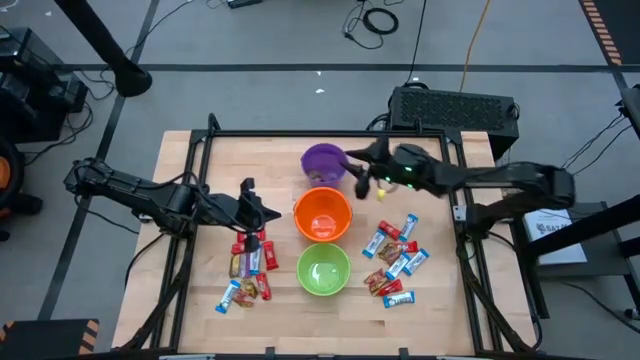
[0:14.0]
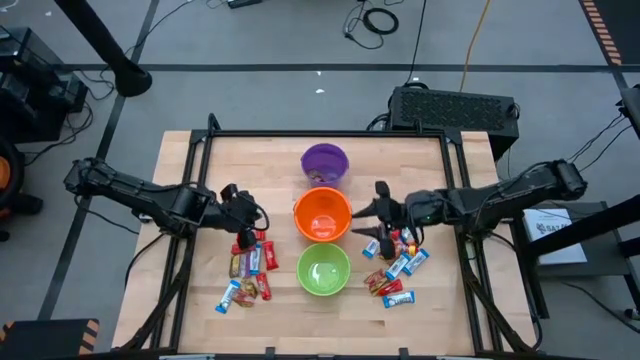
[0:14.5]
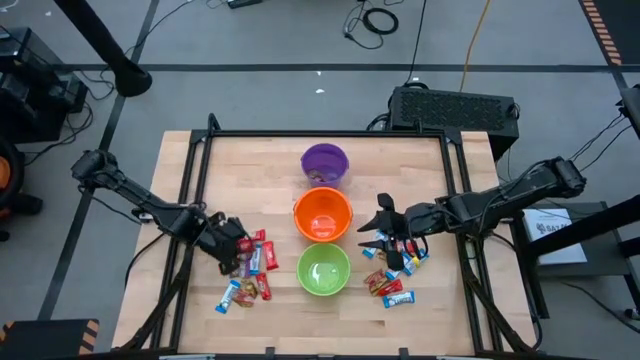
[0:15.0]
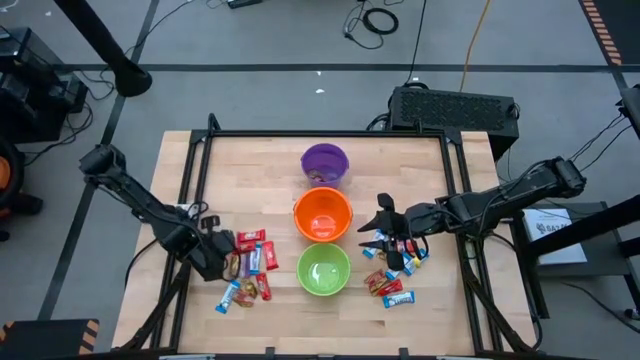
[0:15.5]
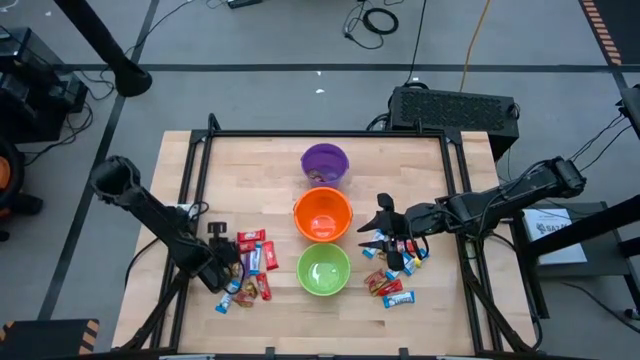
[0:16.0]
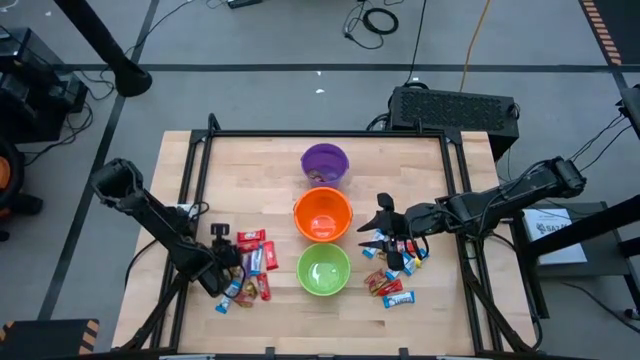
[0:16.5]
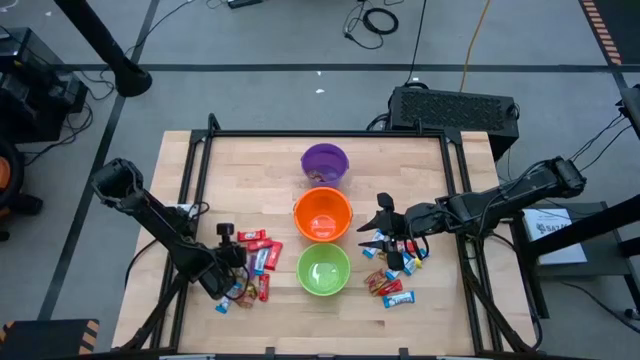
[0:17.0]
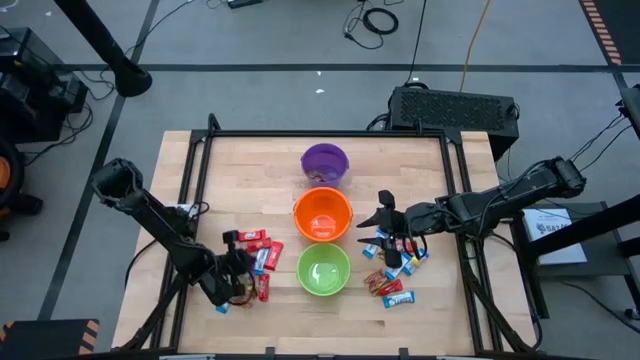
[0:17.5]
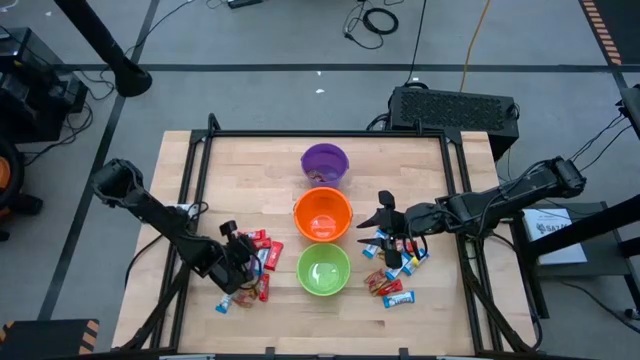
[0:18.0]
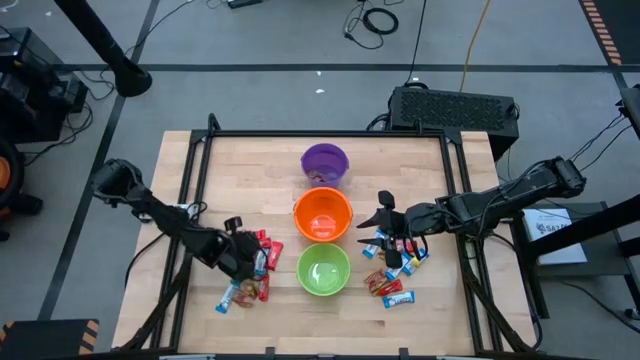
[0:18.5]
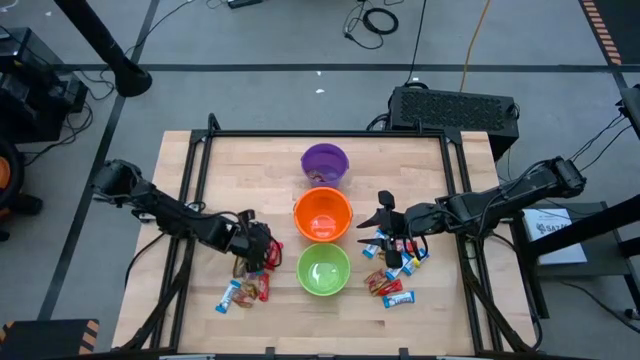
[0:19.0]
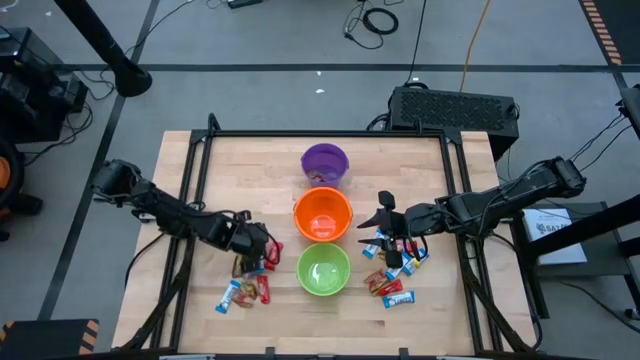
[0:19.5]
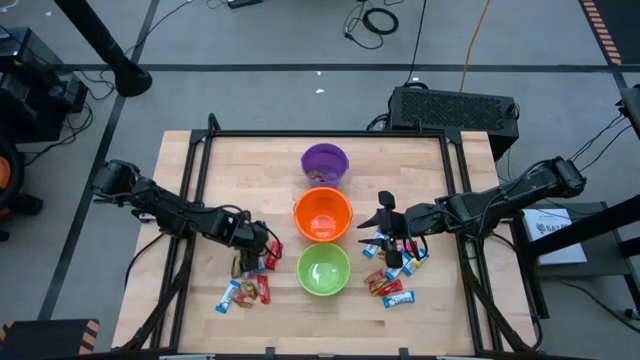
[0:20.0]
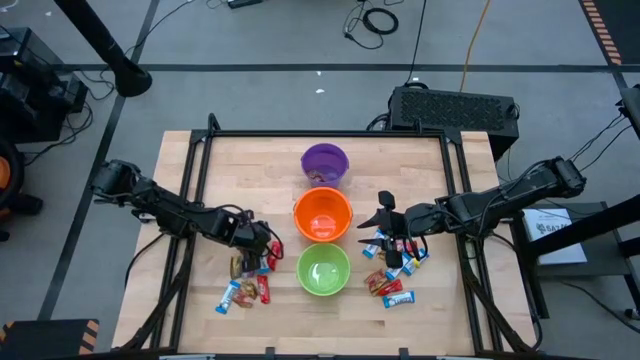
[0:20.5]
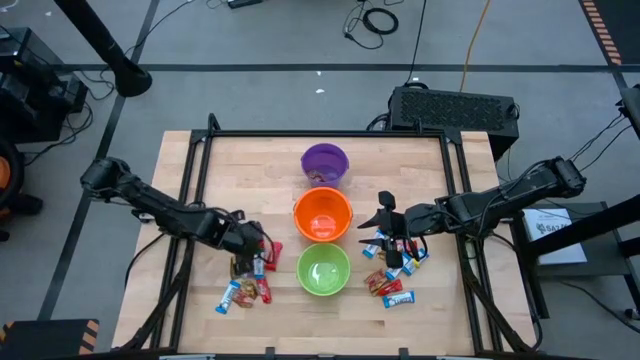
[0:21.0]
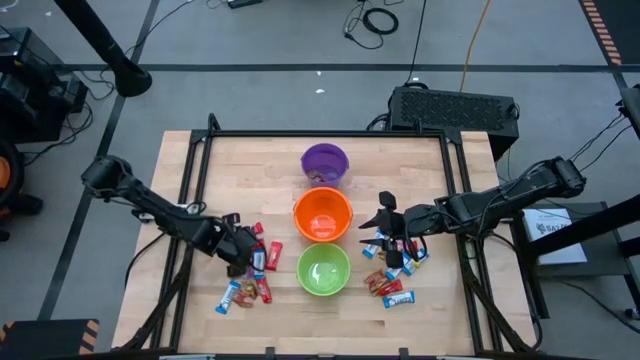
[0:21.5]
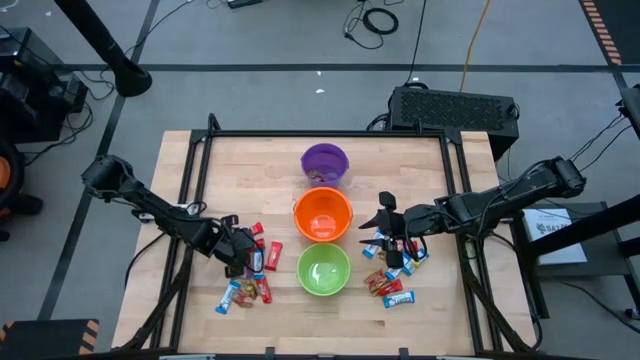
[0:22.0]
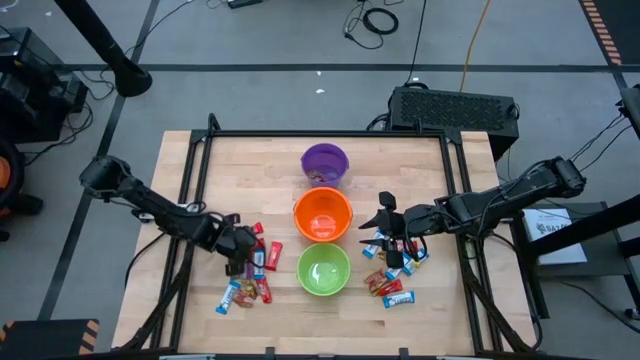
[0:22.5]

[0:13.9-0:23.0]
Task: Sort candy by brand, put in halloween buckets
Put red chocolate bar into the orange bucket

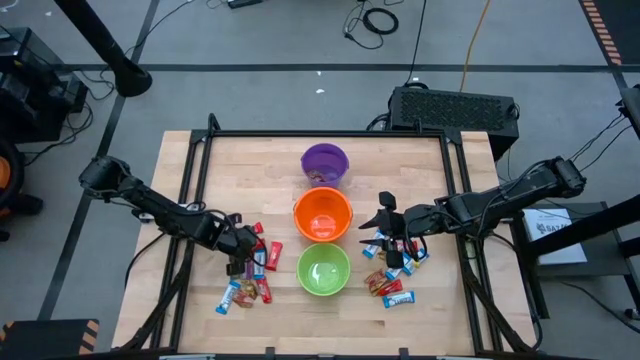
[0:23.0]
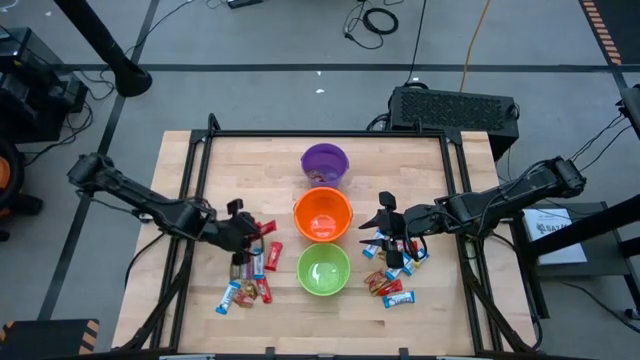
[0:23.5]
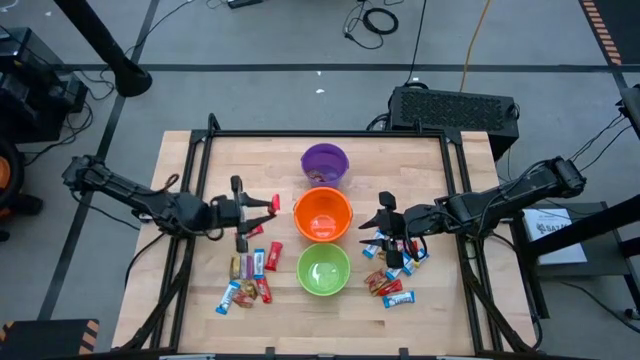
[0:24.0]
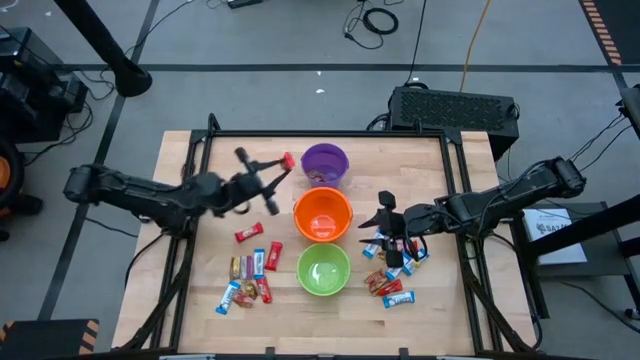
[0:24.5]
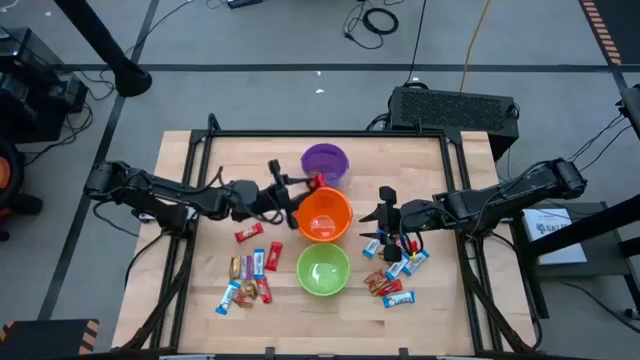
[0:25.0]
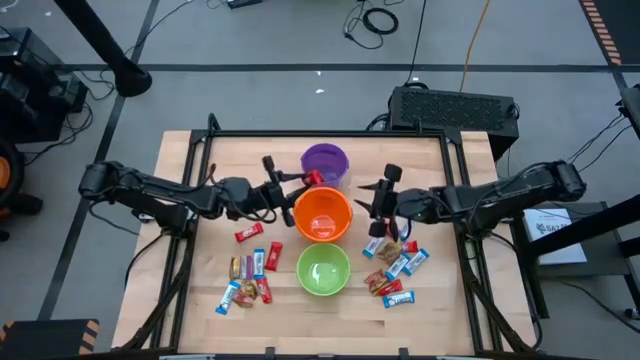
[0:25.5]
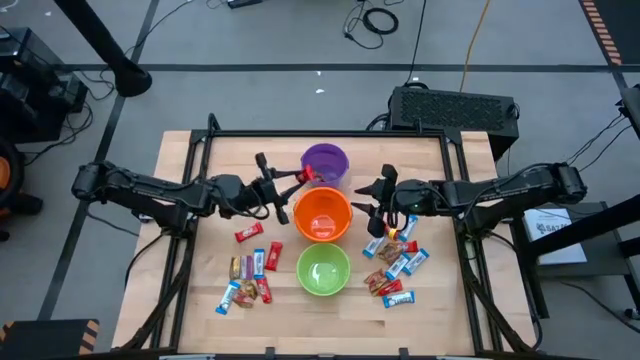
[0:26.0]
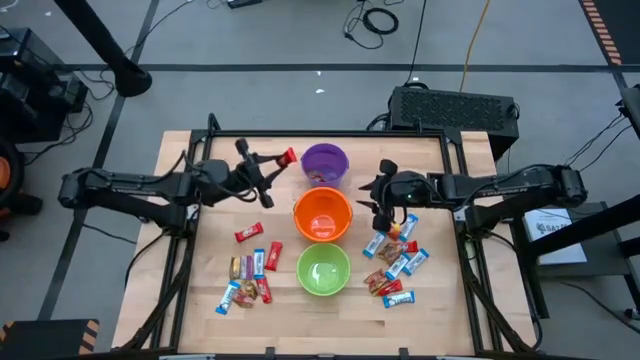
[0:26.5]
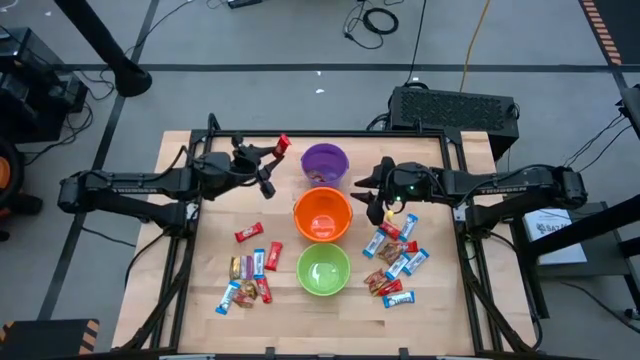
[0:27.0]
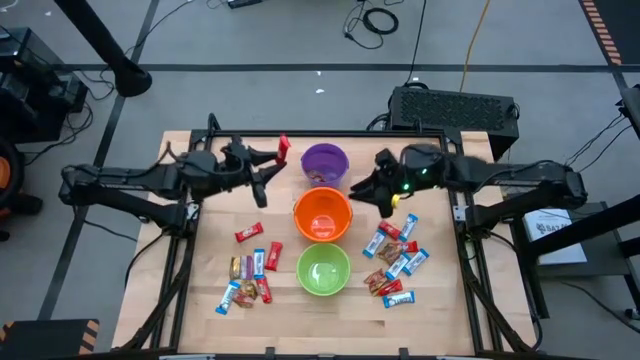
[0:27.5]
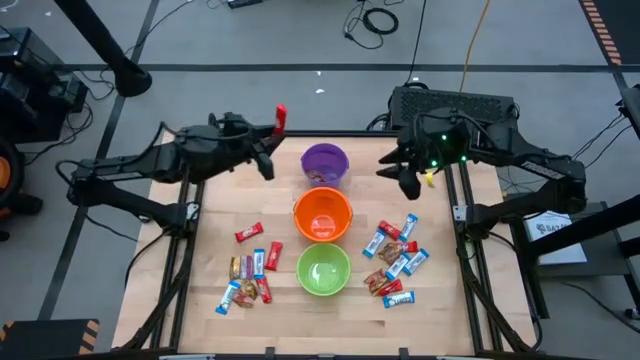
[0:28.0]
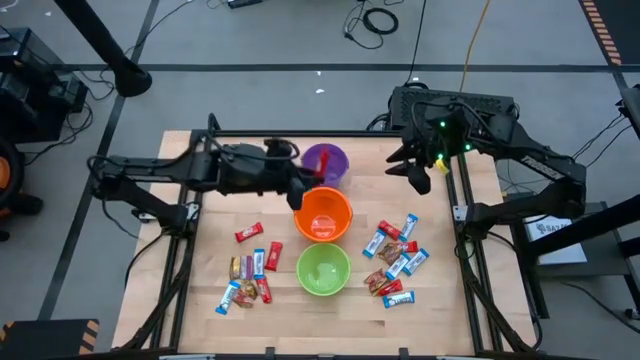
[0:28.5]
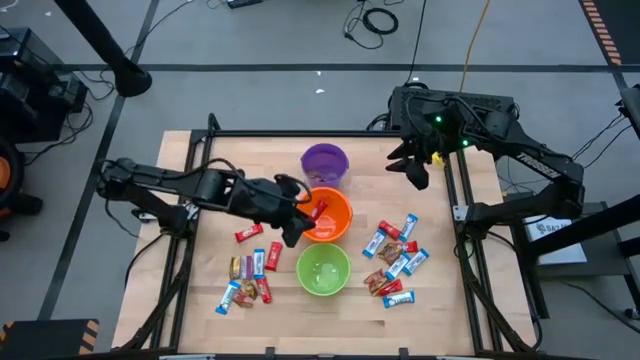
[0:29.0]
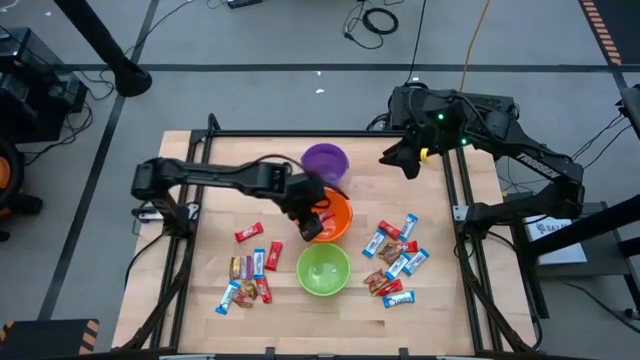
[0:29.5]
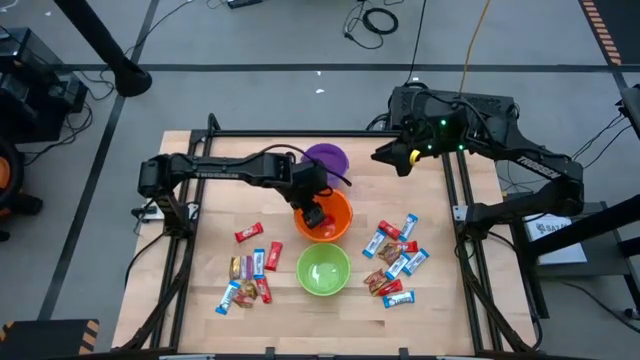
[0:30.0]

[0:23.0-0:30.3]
Put red chocolate bar into the orange bucket

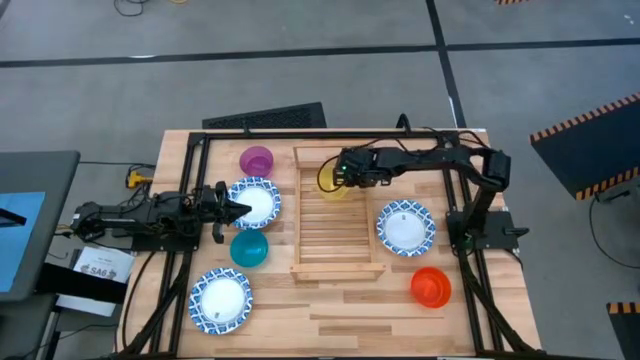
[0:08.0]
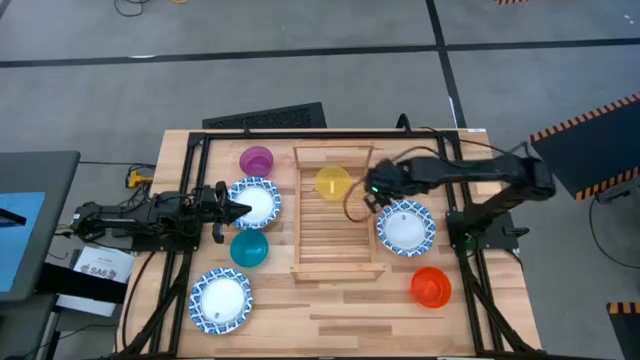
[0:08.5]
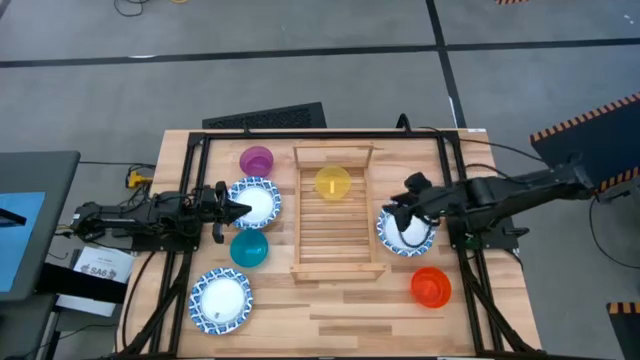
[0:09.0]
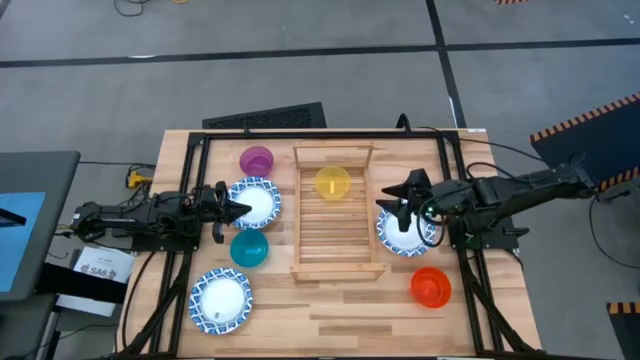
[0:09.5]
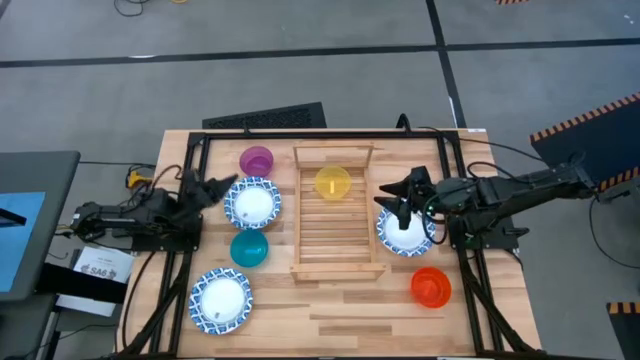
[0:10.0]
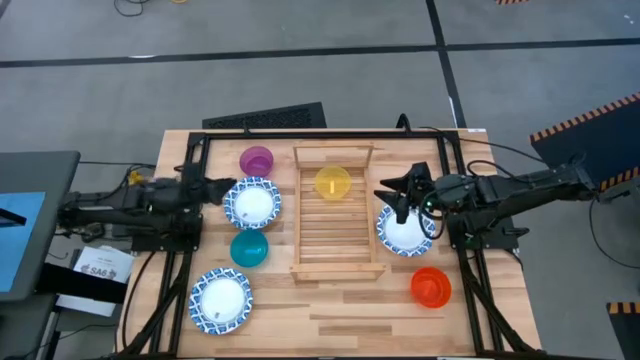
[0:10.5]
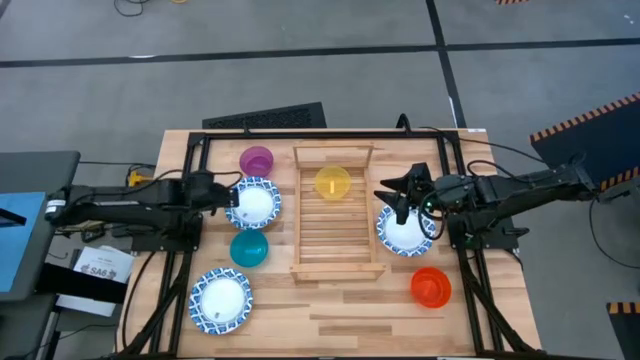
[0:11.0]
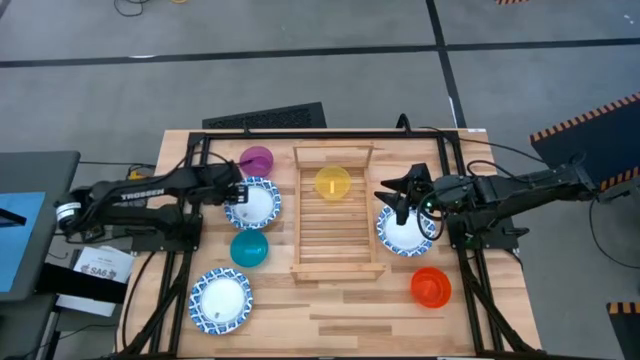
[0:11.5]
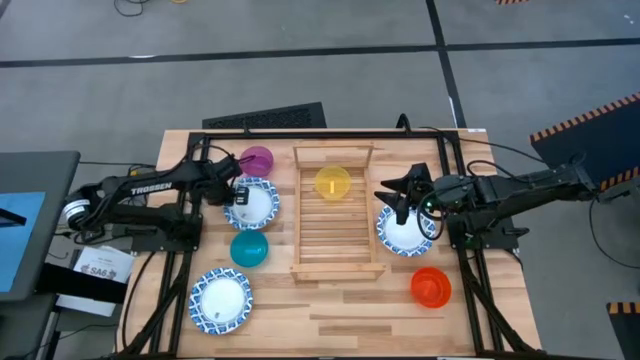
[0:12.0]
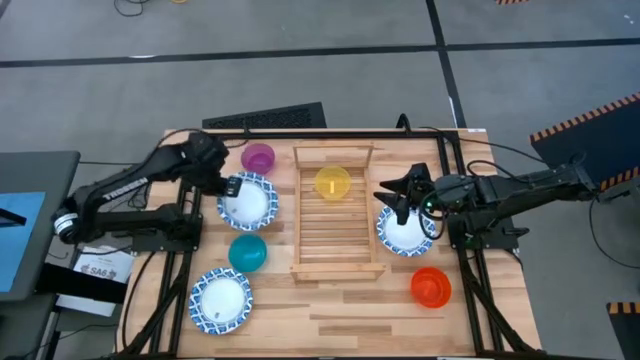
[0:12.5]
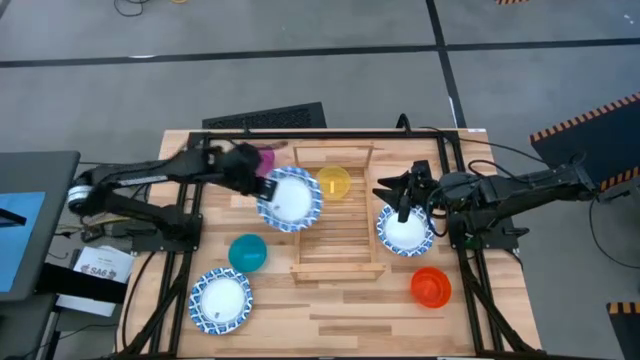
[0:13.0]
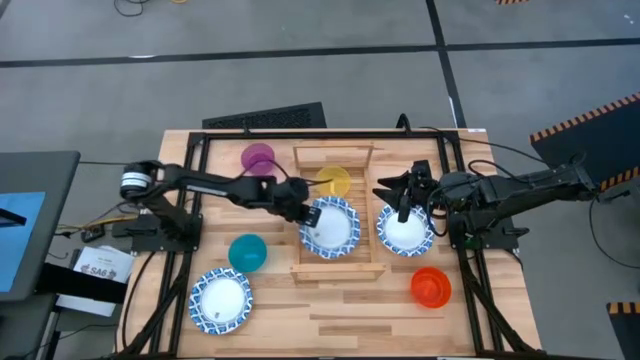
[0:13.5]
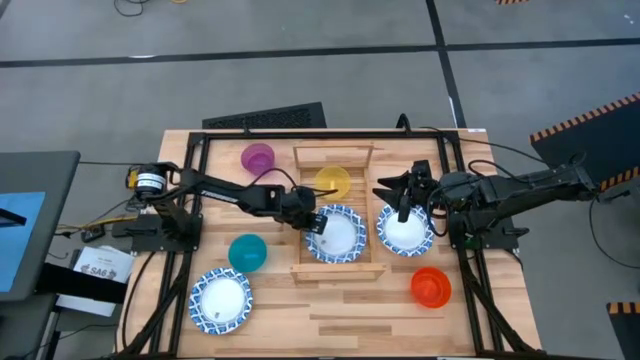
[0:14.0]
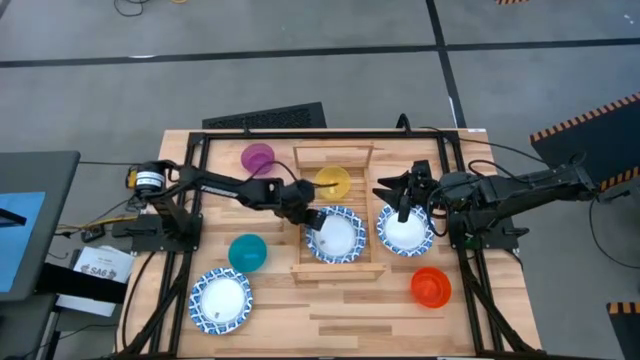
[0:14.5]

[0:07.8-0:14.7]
Task: Place and stack bowls onto a shelf
Put the top left blue patterned bowl on the shelf
